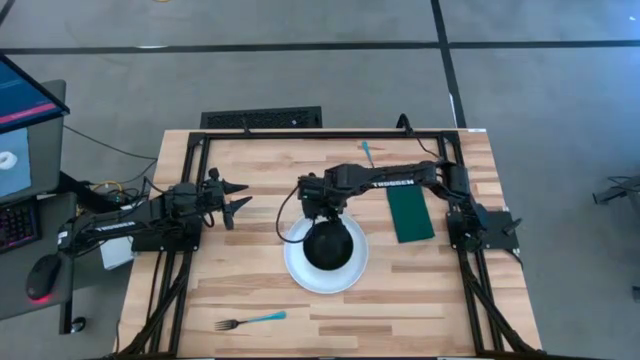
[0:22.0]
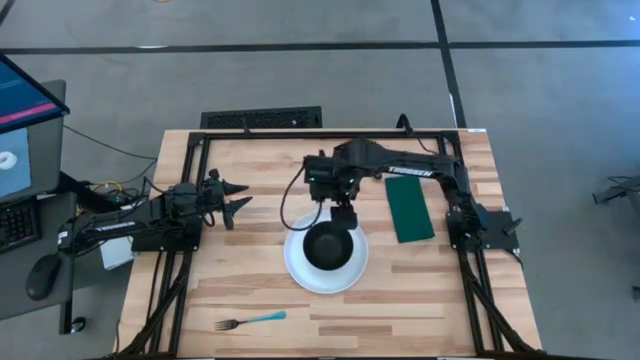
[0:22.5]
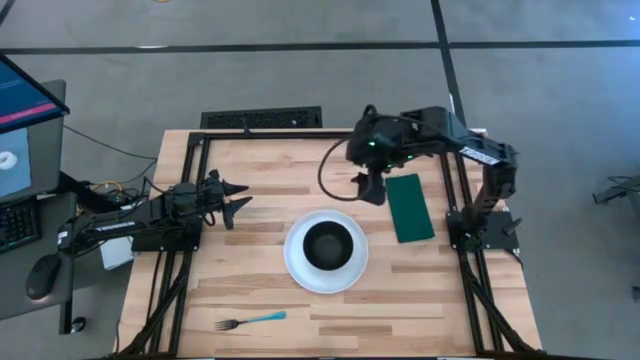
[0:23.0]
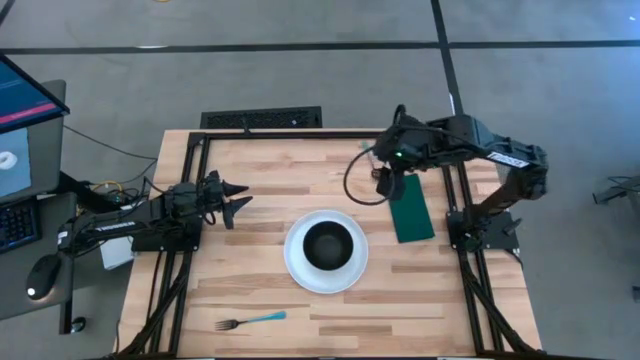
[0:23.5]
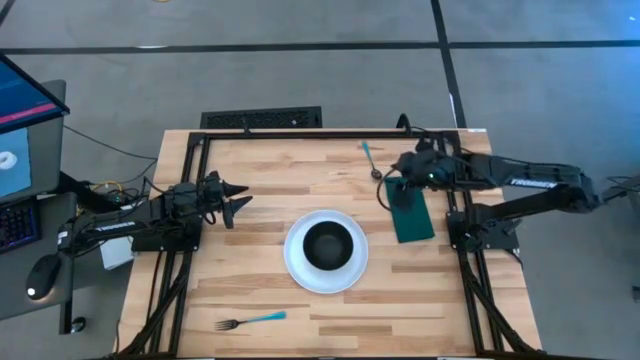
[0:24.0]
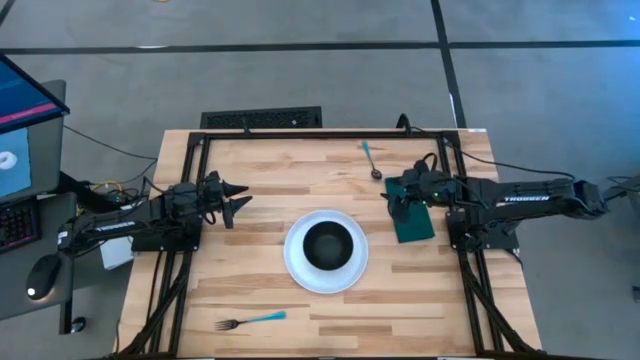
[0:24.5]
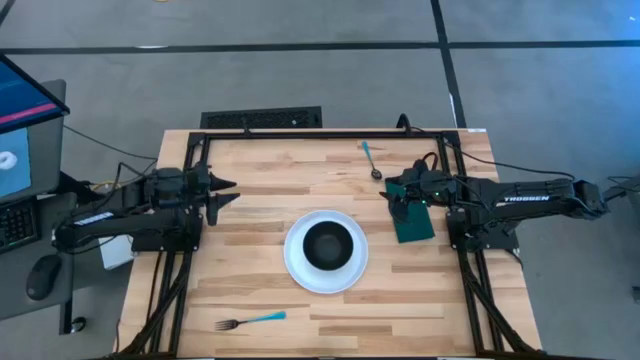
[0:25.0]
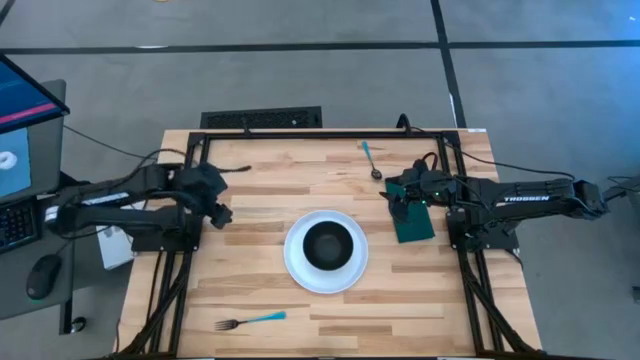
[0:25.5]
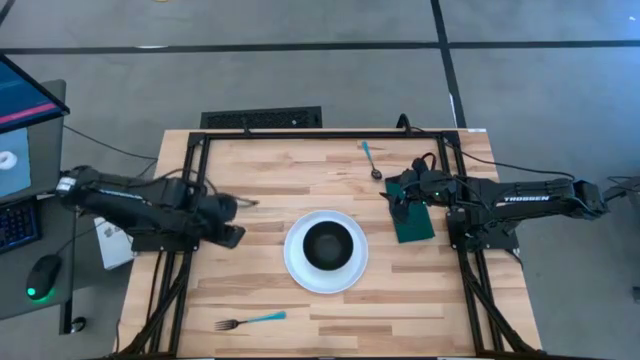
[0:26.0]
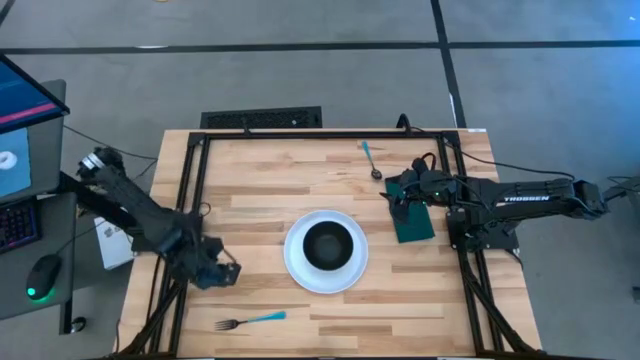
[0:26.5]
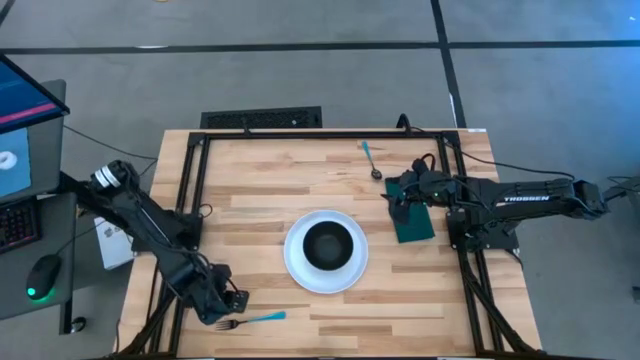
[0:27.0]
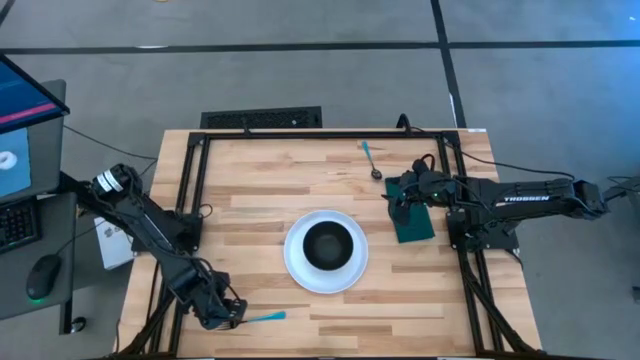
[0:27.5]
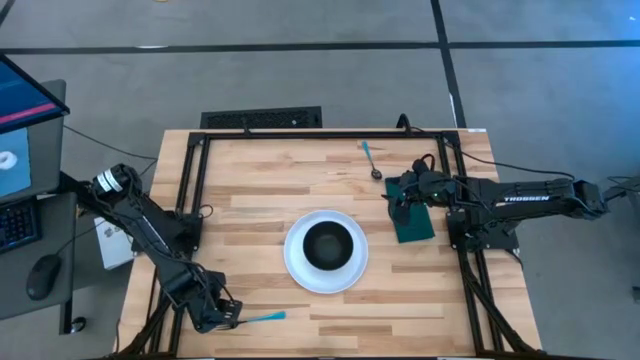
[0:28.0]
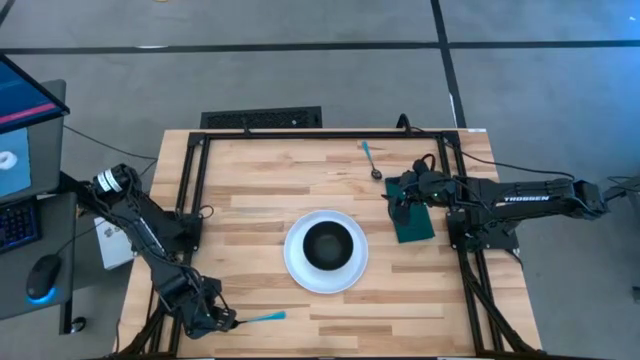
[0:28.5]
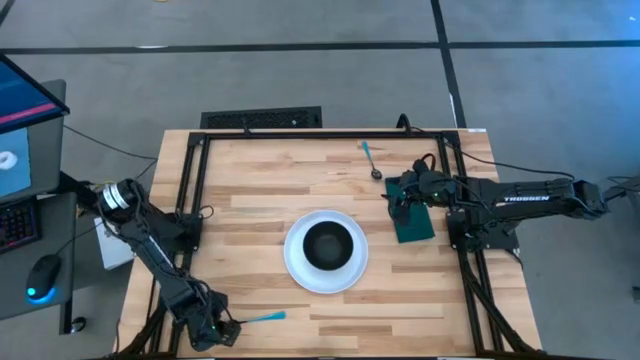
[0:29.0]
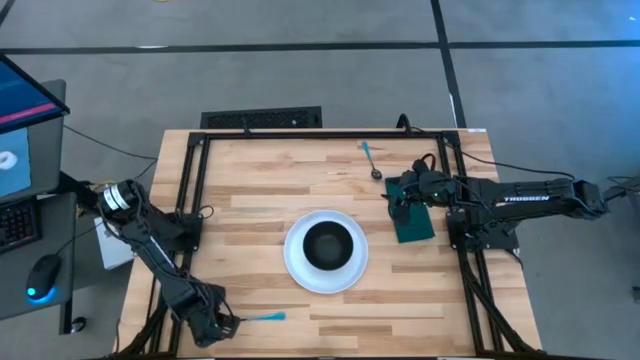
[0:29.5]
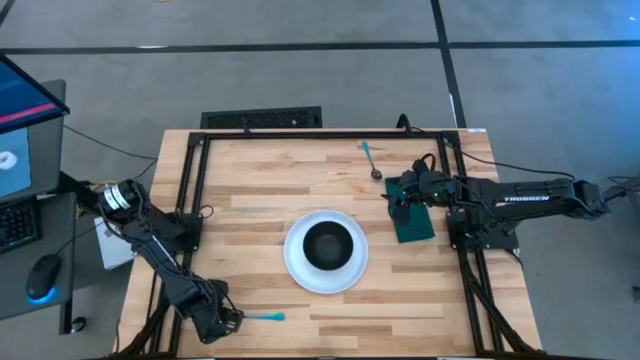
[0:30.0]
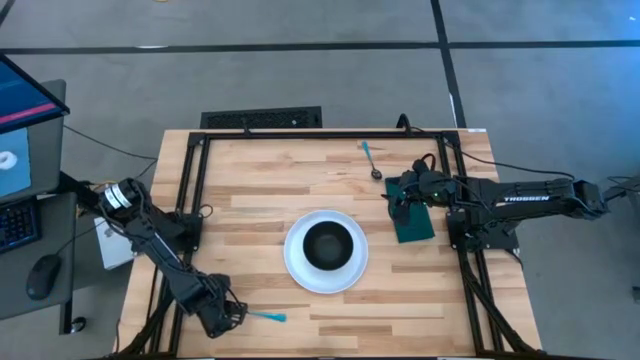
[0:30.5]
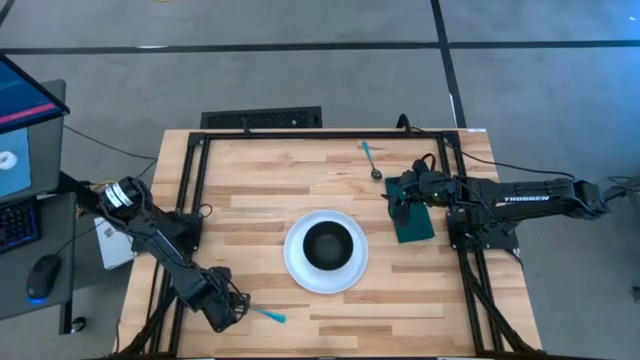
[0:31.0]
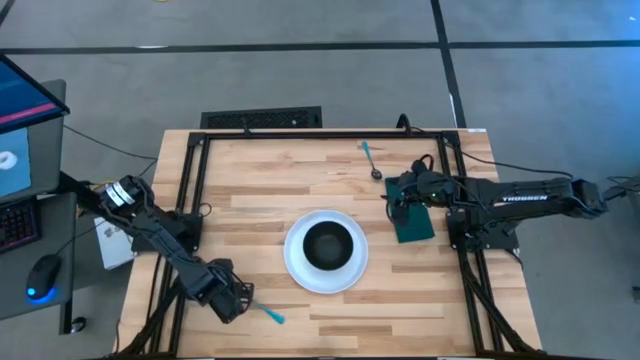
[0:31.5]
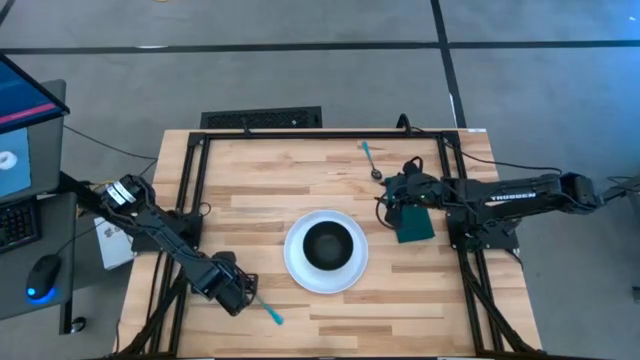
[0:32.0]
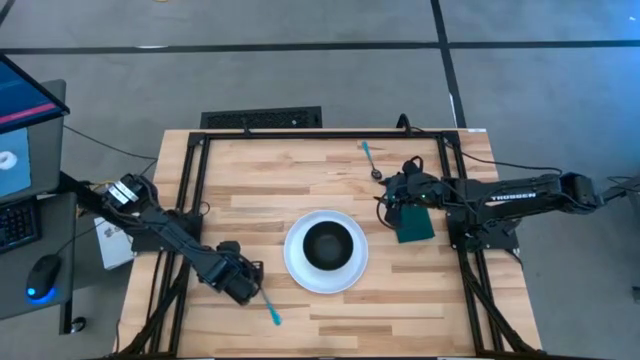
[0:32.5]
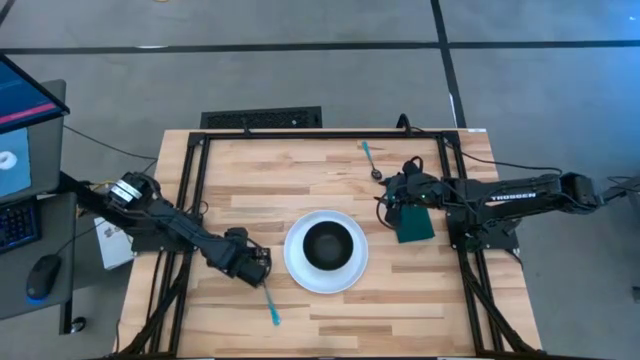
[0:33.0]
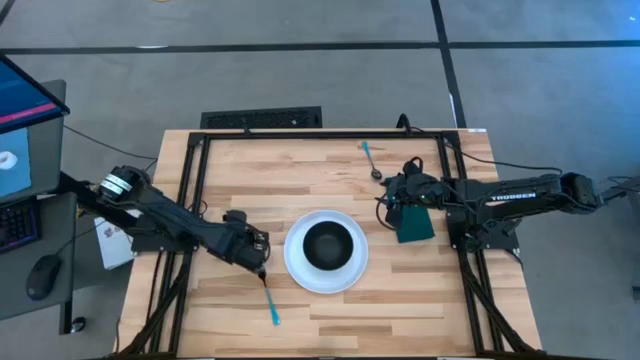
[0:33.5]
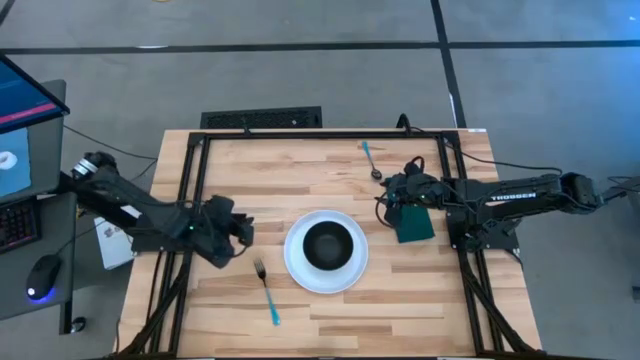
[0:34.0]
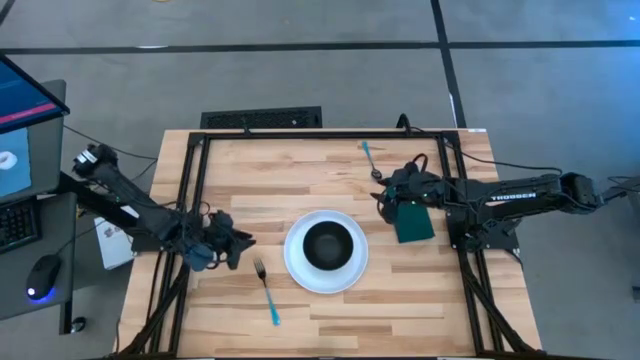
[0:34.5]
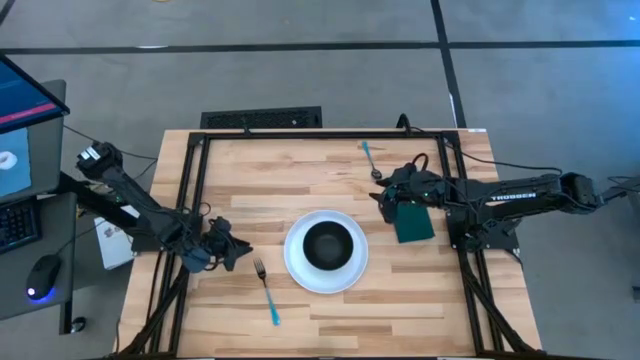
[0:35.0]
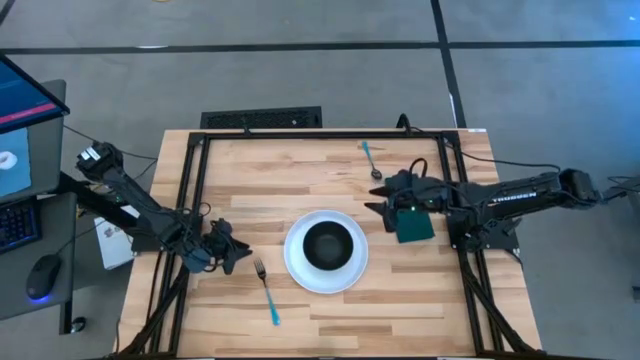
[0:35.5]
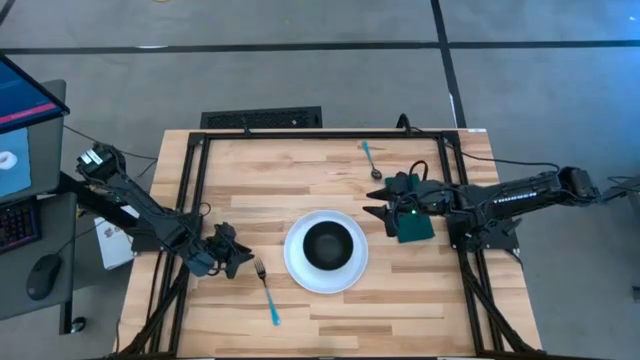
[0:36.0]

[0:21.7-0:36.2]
Task: Set table place
Put the blue fork to the right of the white plate

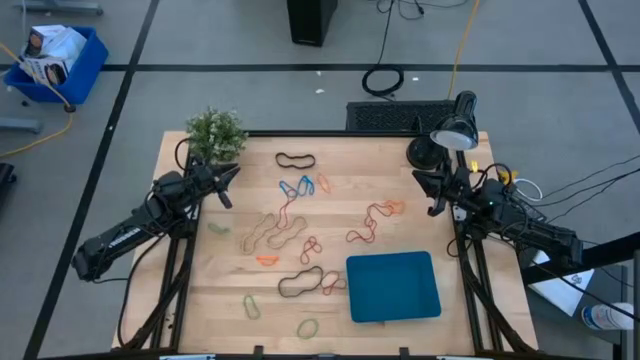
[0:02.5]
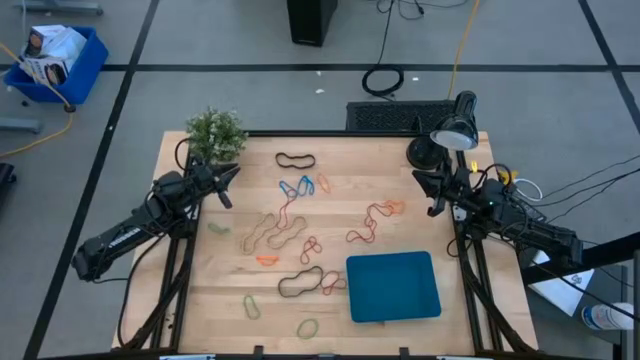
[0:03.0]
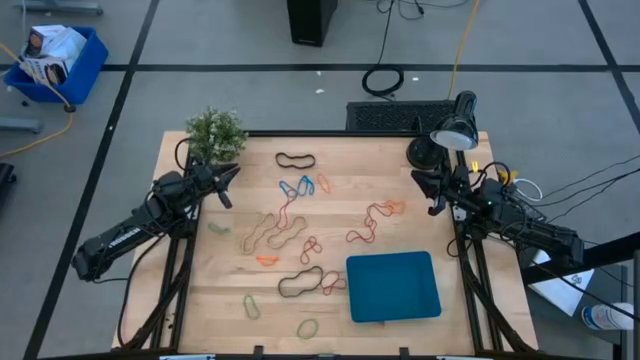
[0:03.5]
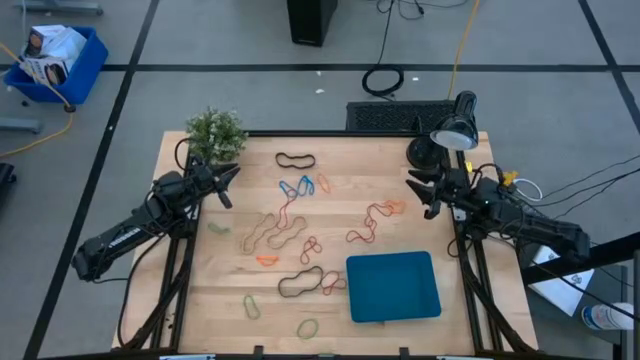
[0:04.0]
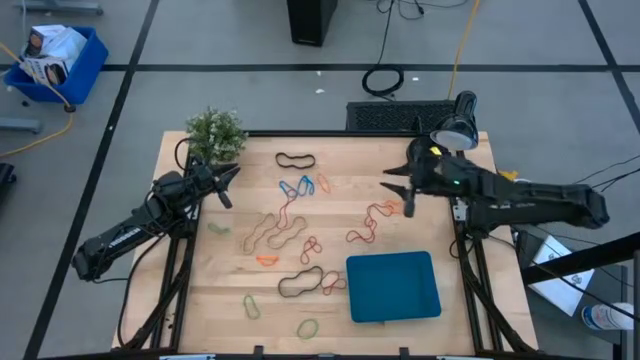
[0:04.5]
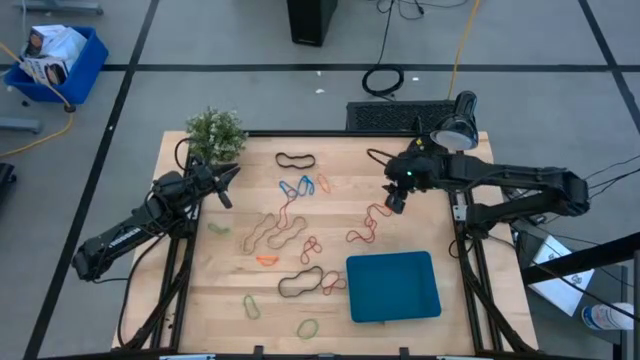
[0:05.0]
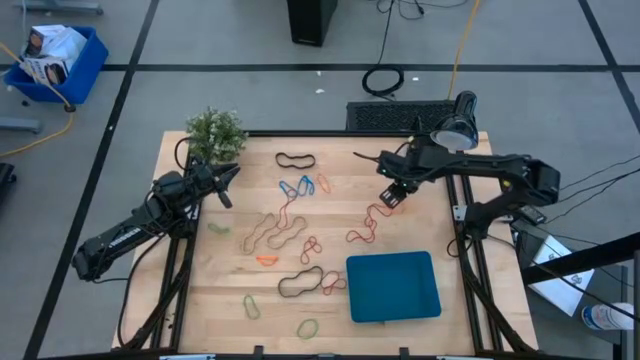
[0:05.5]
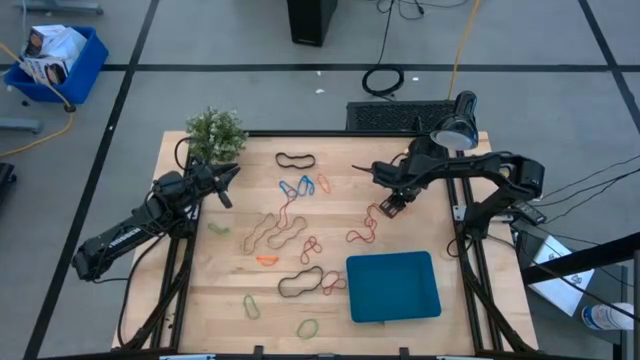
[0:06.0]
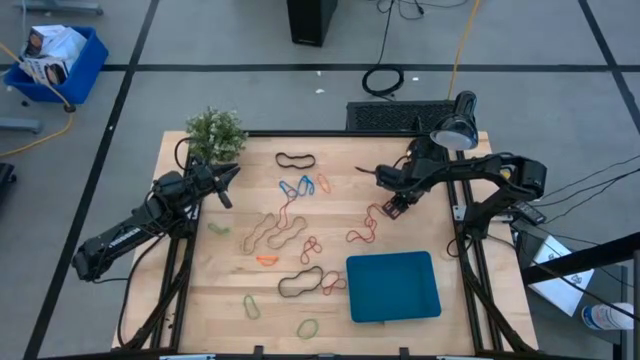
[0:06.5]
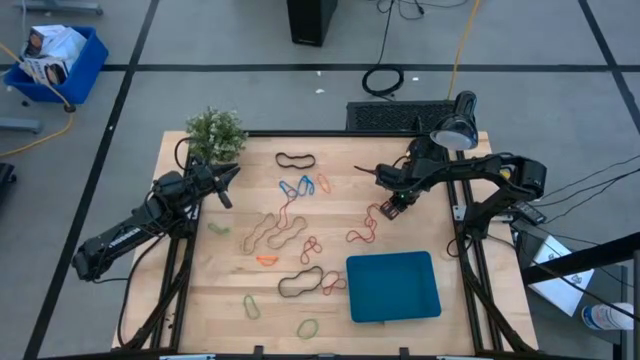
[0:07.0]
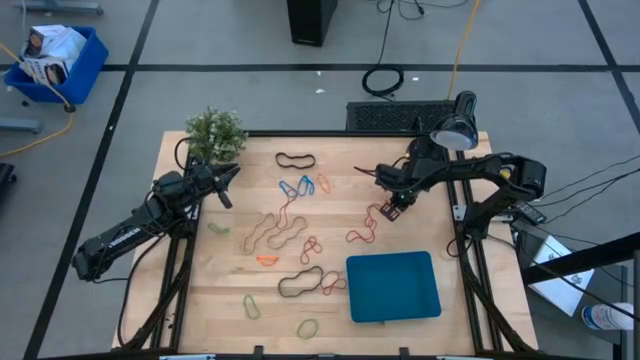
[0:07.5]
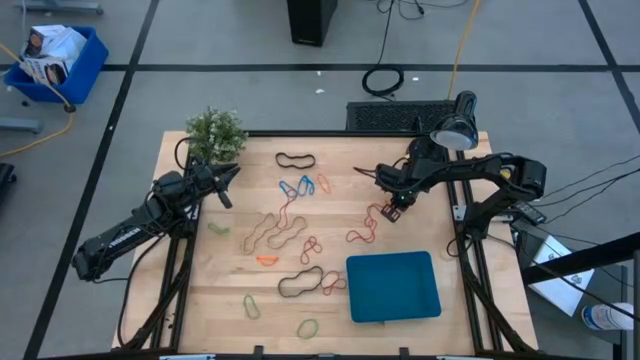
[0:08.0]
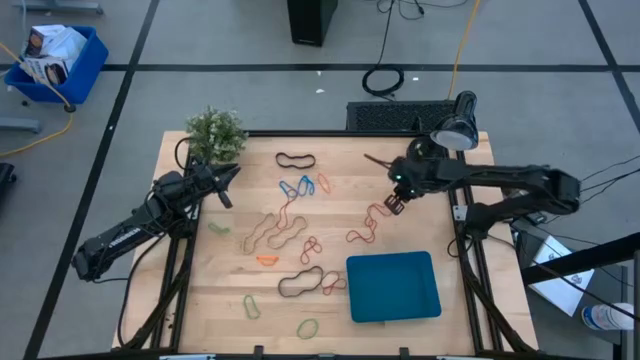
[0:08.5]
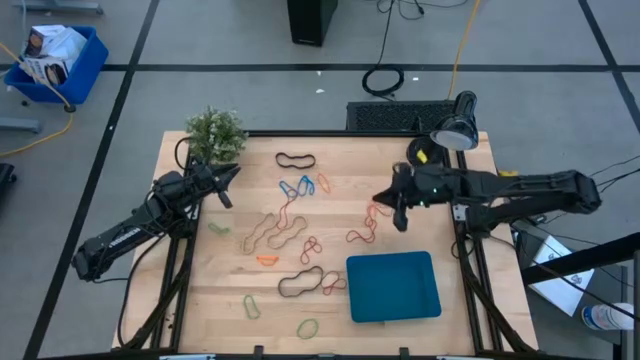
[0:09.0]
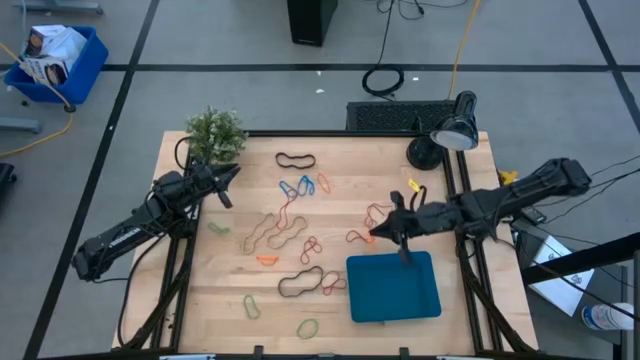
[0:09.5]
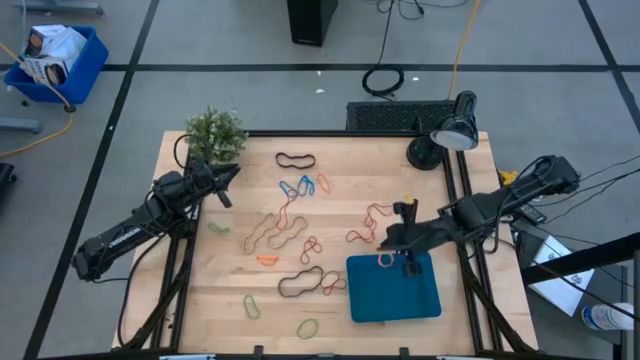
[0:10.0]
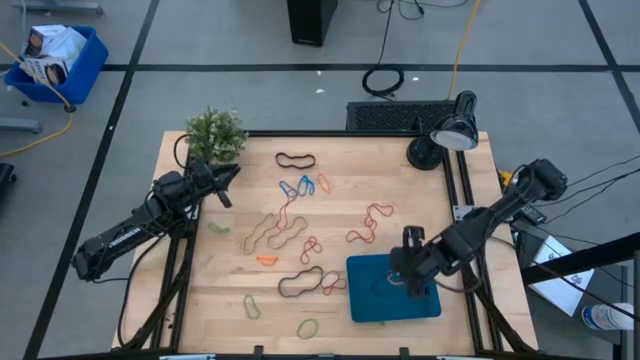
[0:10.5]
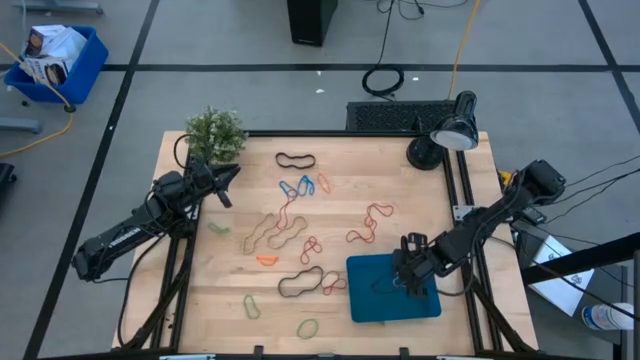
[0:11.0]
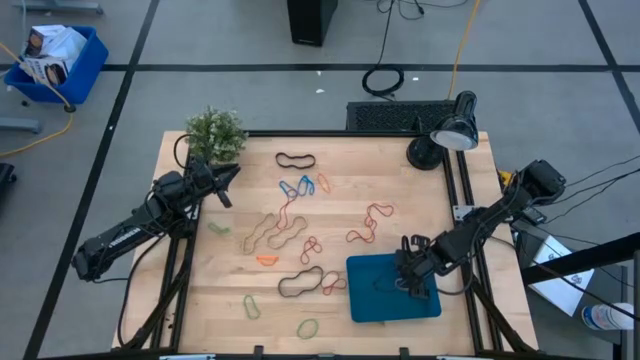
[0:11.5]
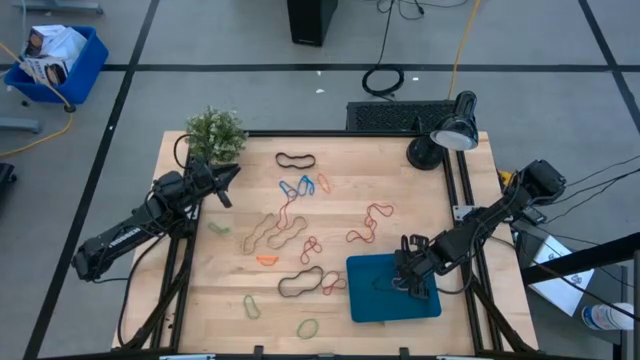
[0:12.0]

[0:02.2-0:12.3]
Task: Pick and place rubber bands into bin
Put the orange rubber band into the blue bin
